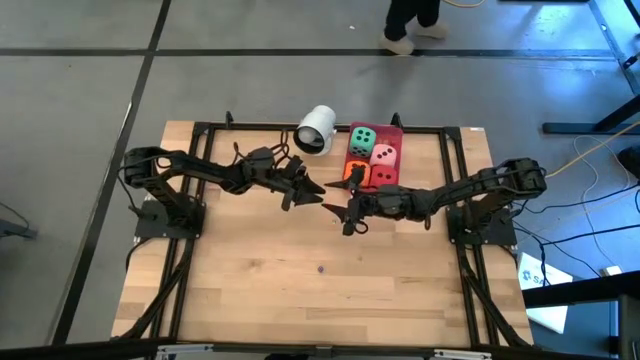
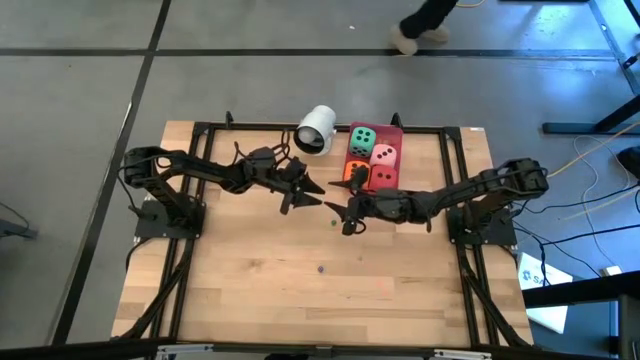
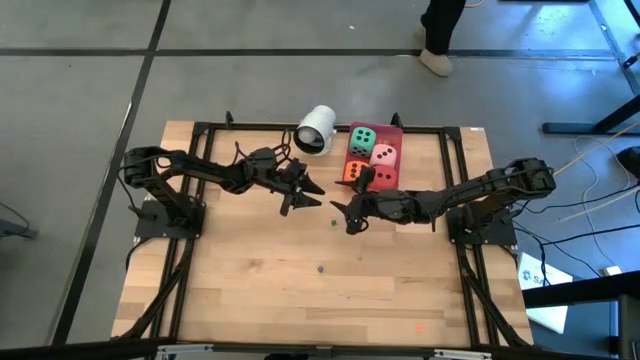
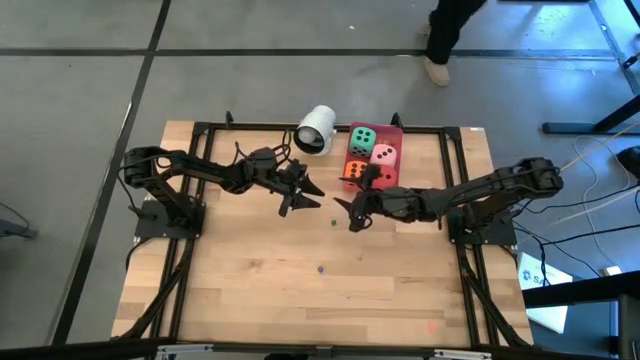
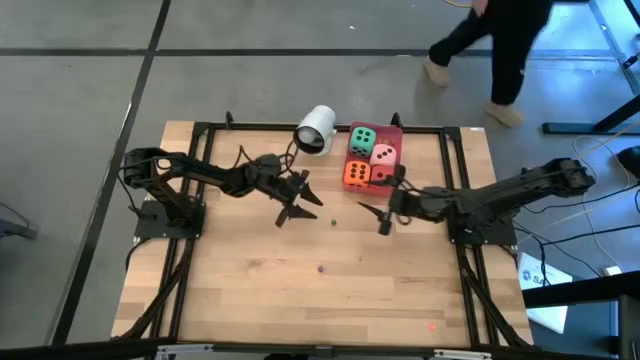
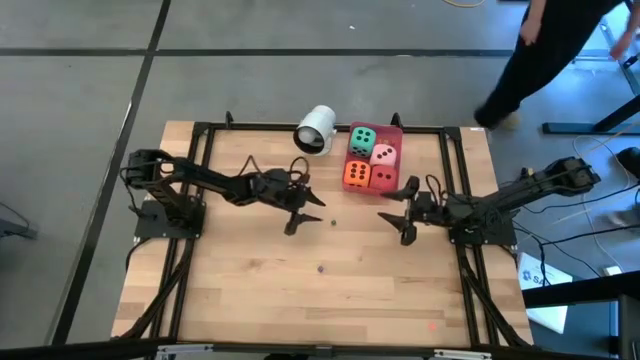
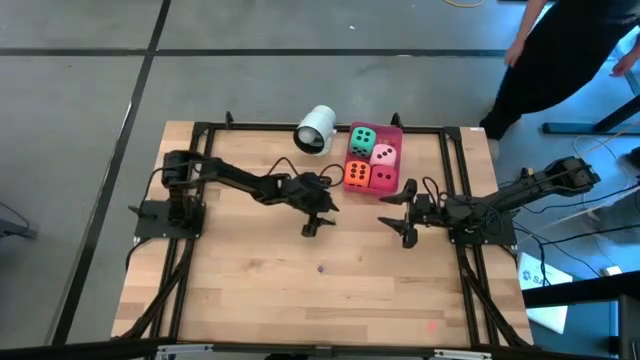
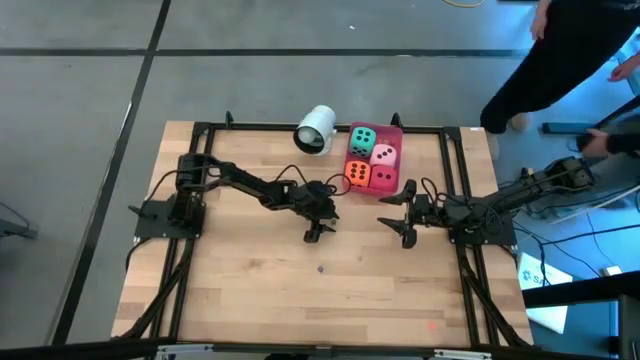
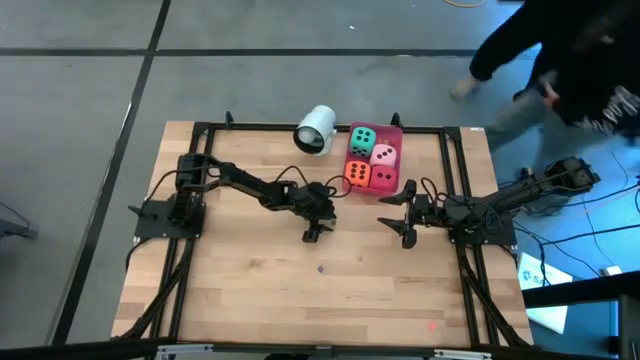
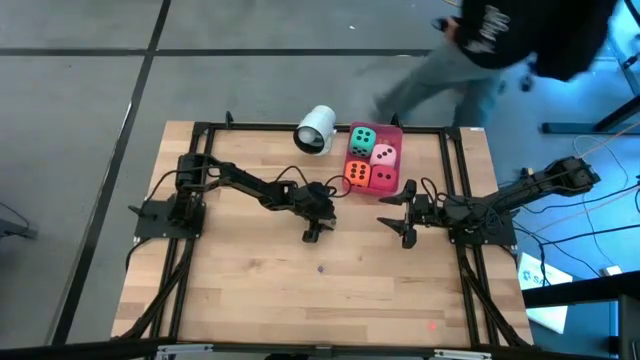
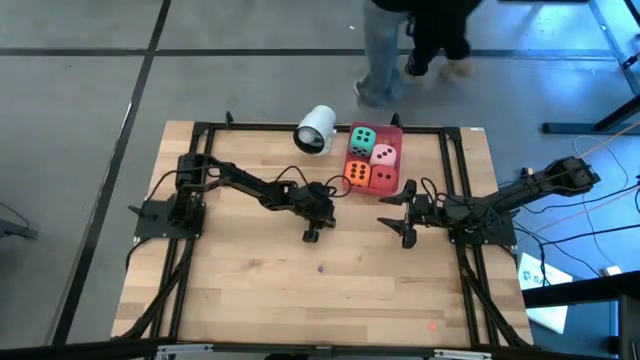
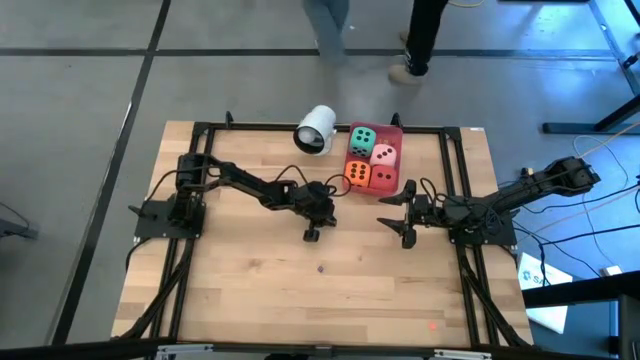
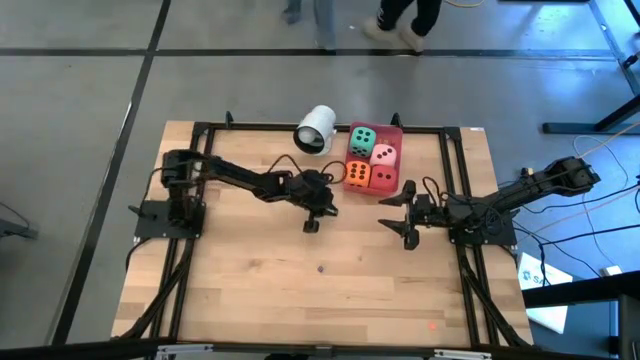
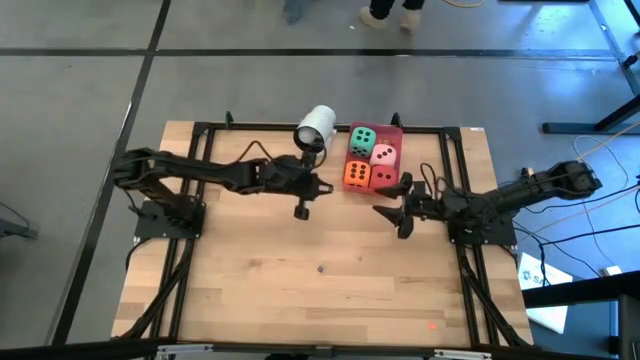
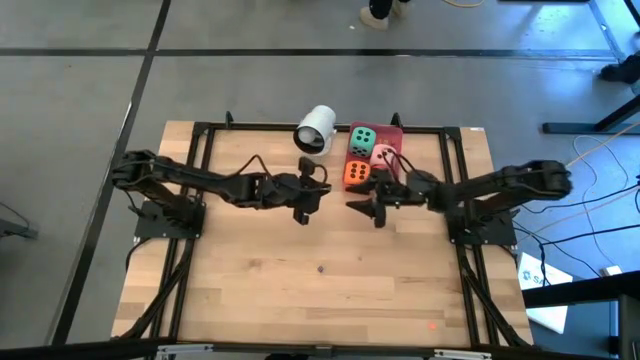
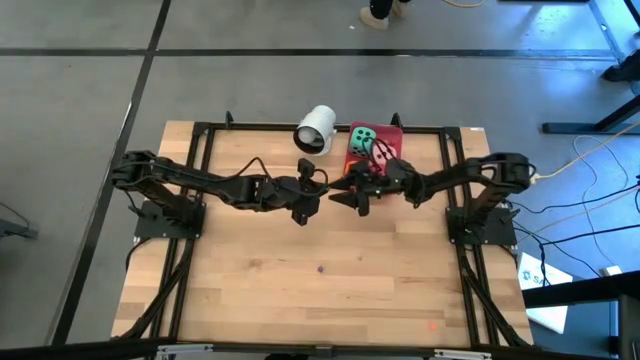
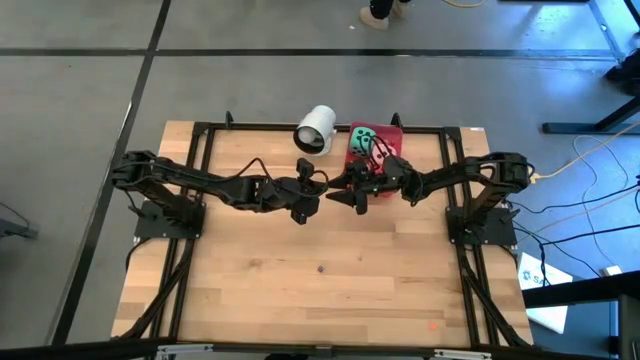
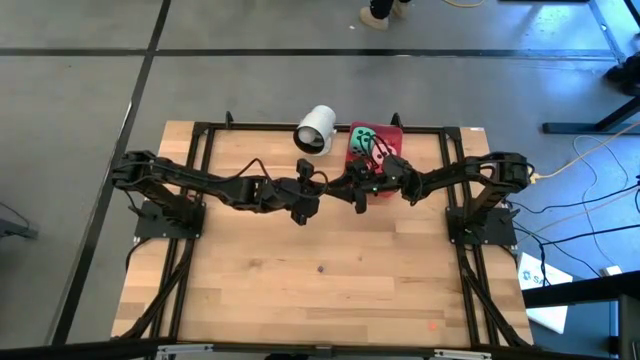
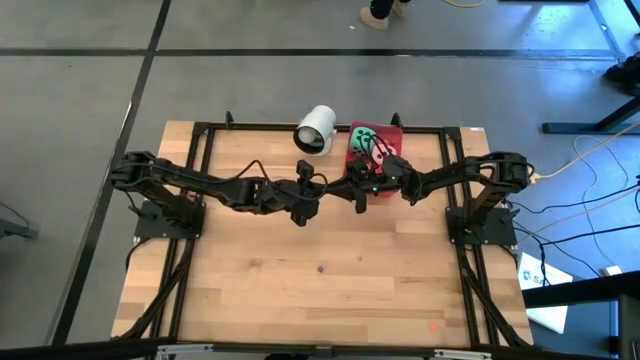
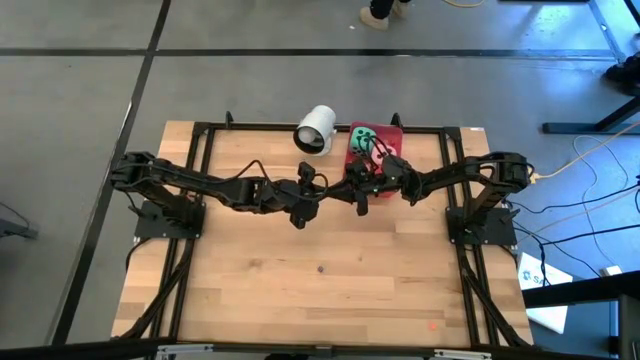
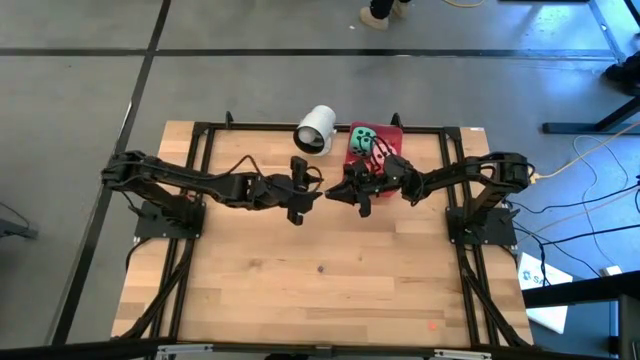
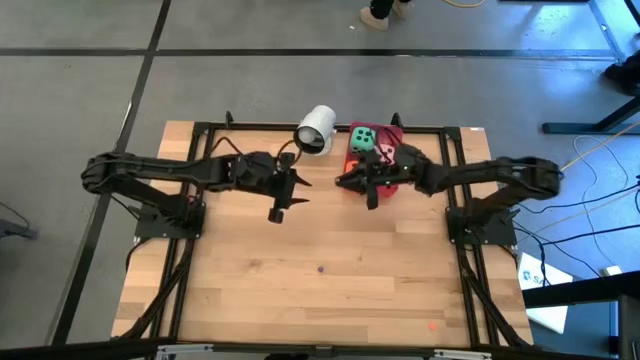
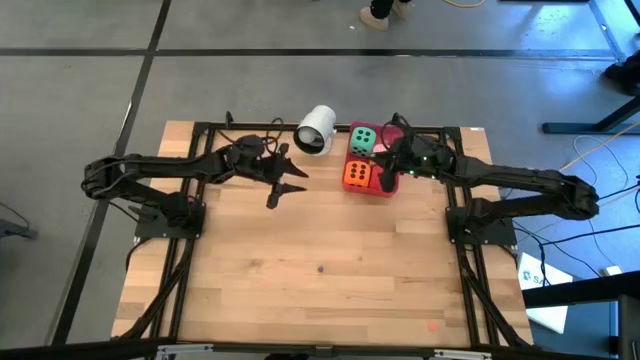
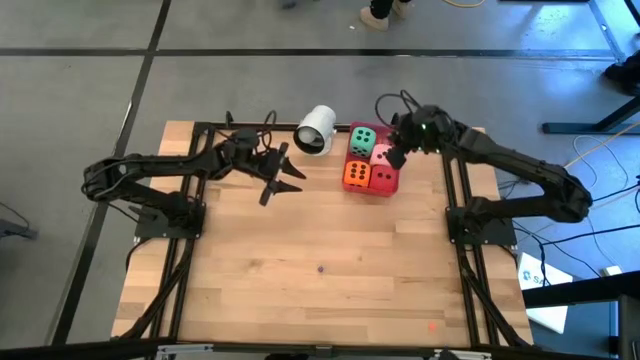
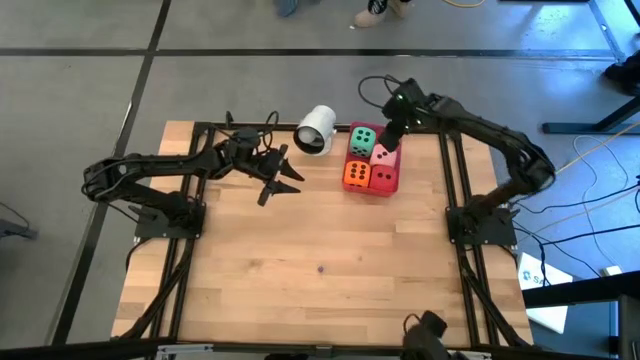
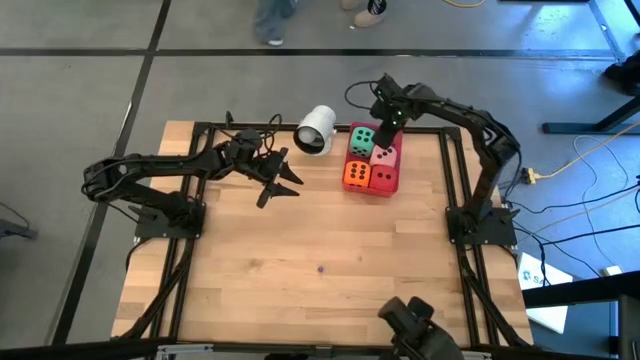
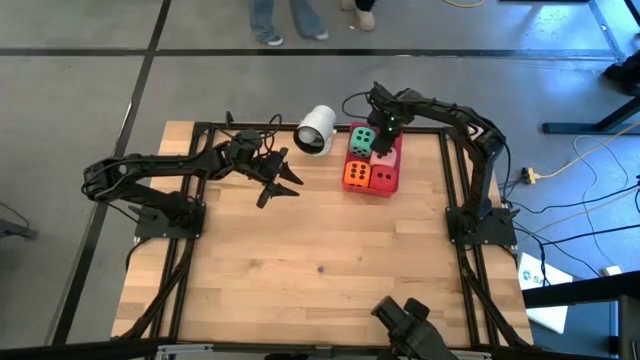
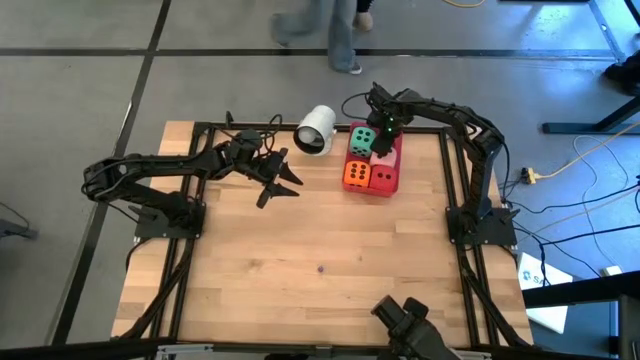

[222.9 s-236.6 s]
Task: Pick & Place Dice
Put the small green dice into the red bin

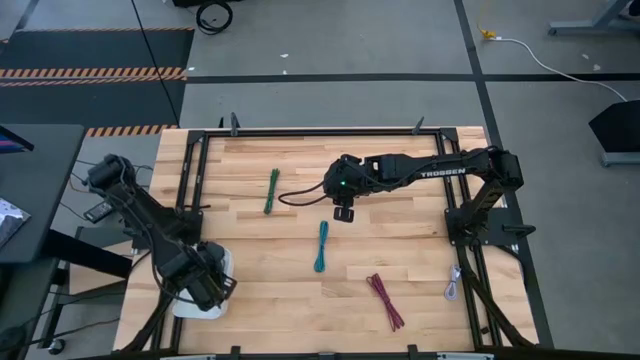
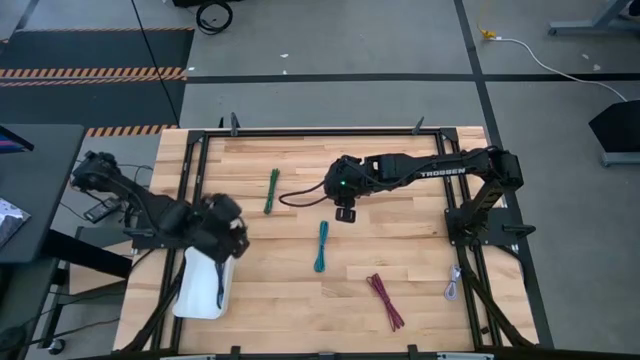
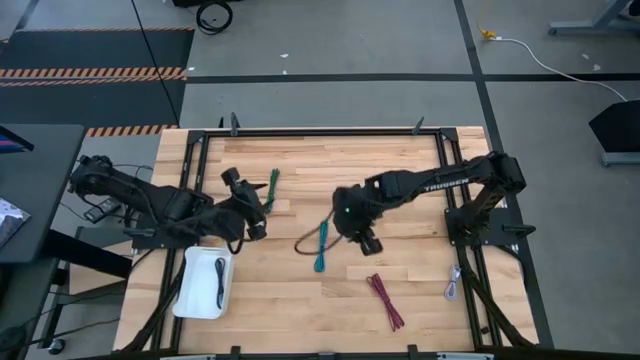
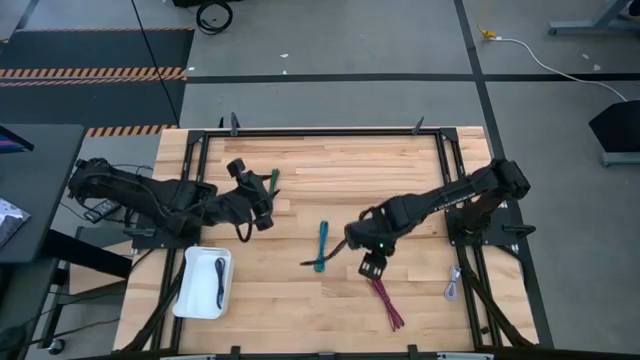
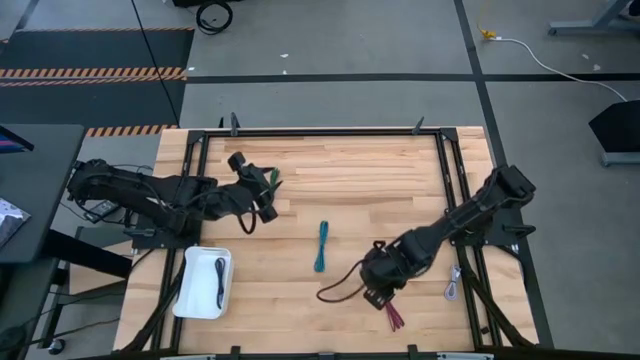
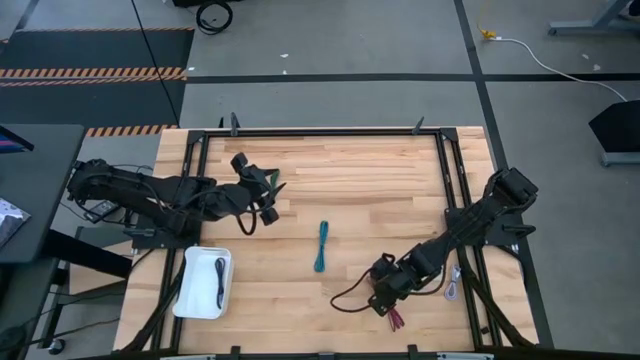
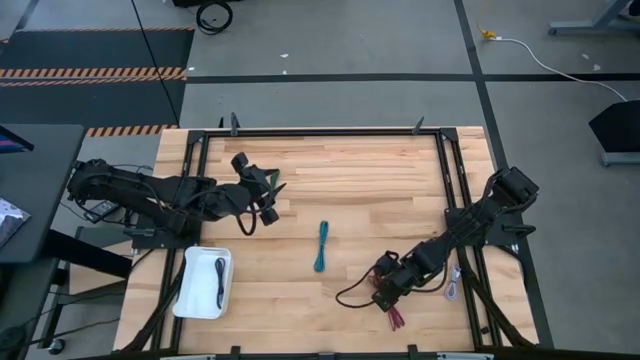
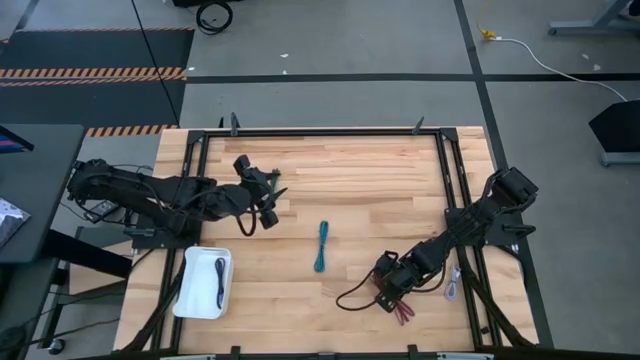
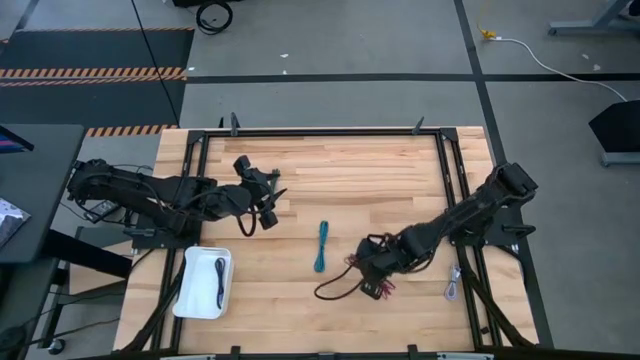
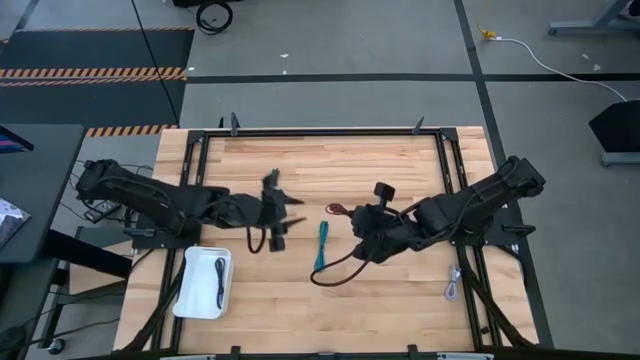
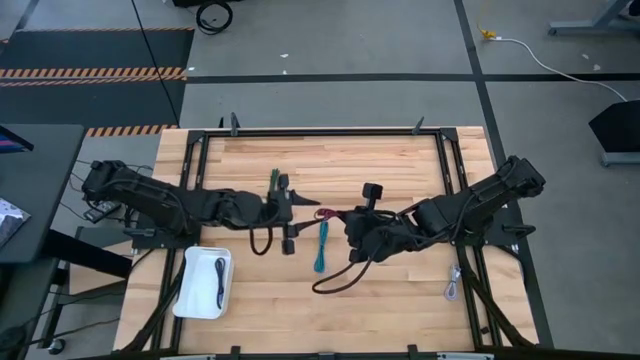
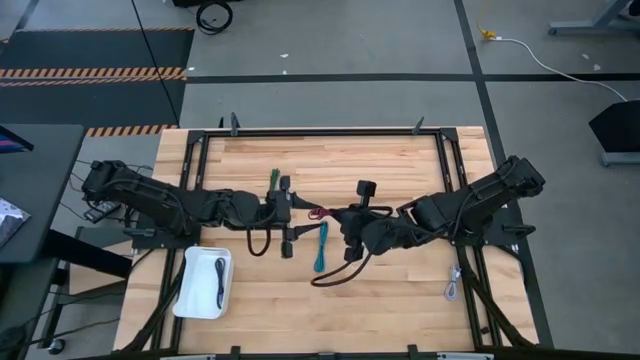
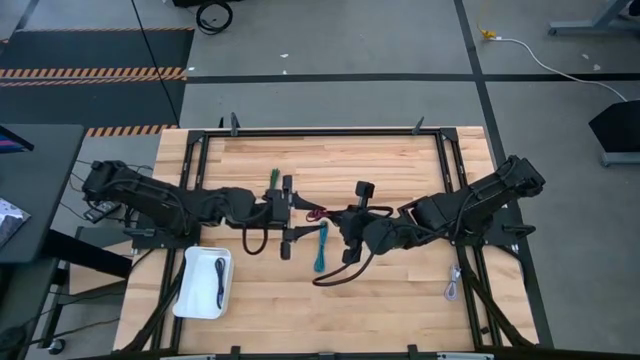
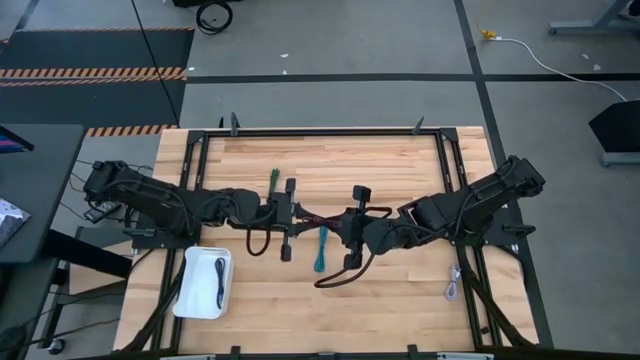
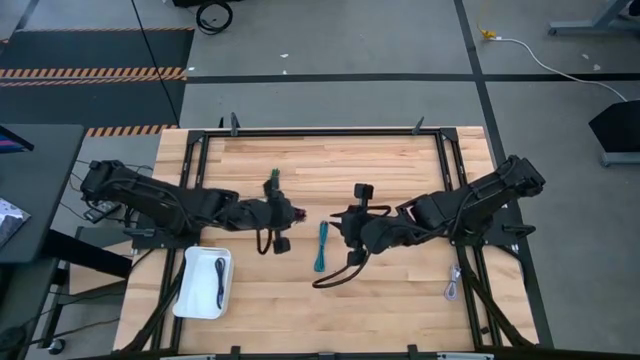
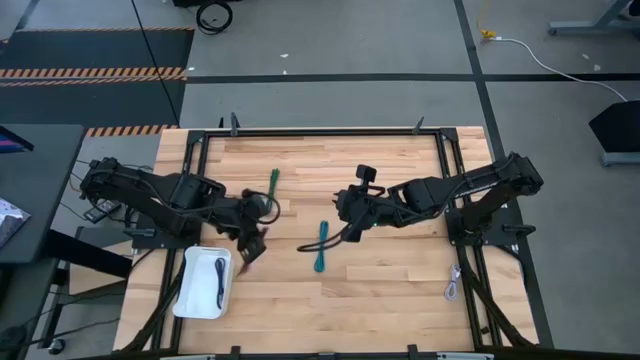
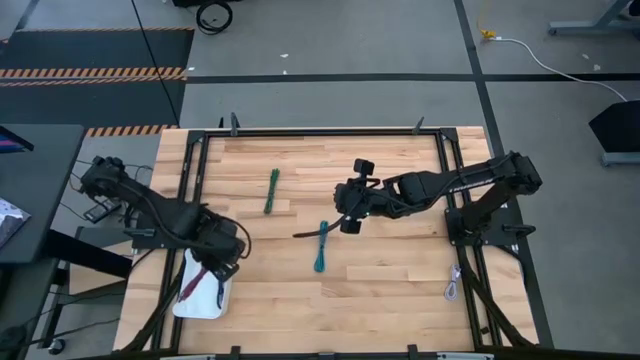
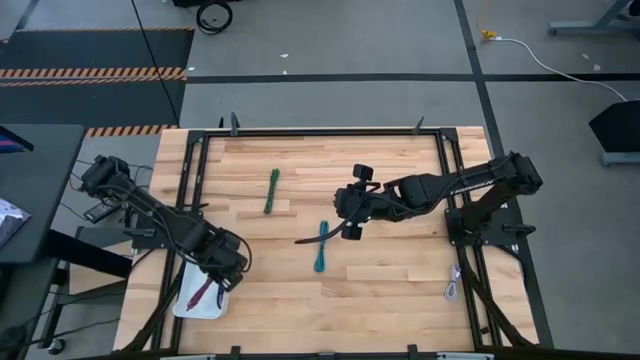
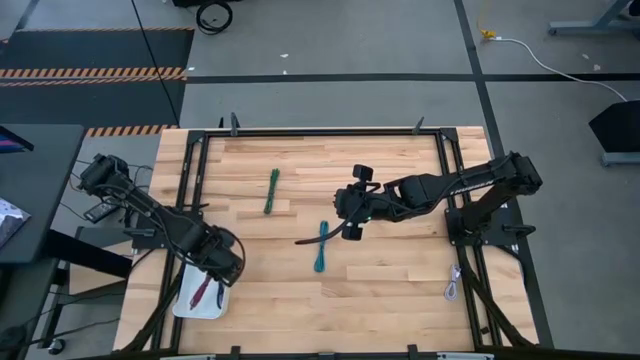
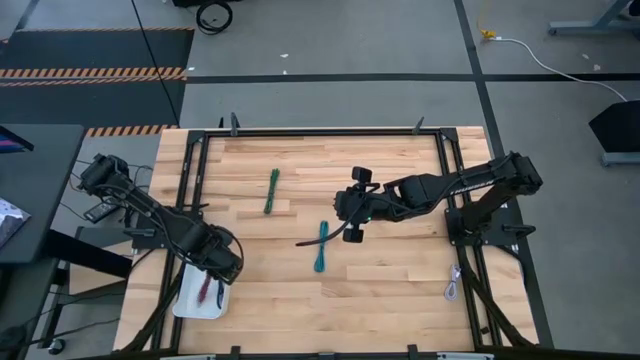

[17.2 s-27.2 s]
Task: Pick and place USB-C Cables
Put the pink charger cable into the white bin
